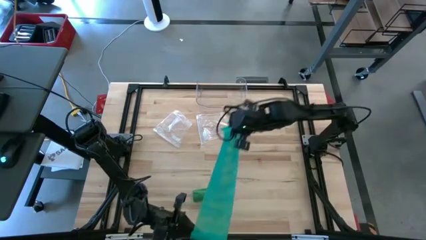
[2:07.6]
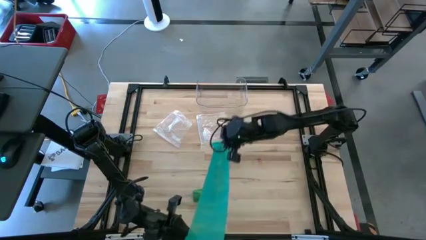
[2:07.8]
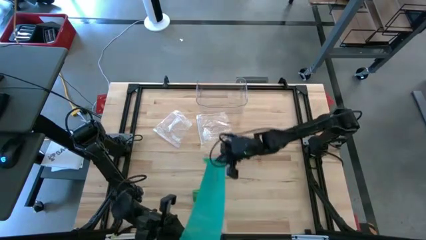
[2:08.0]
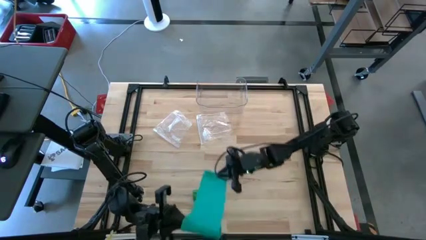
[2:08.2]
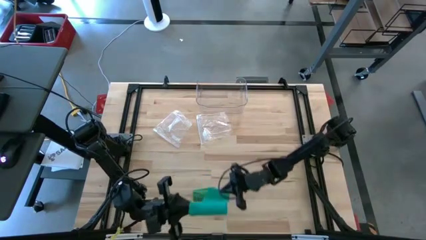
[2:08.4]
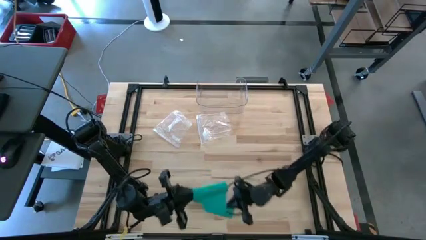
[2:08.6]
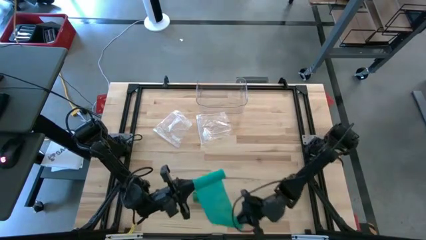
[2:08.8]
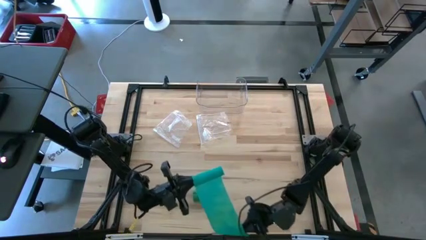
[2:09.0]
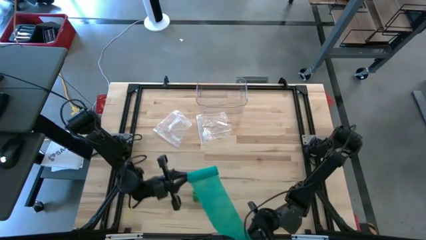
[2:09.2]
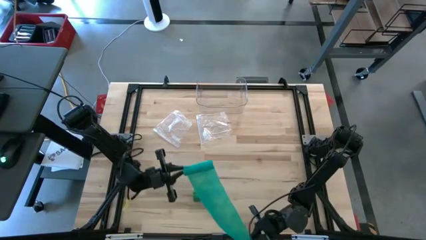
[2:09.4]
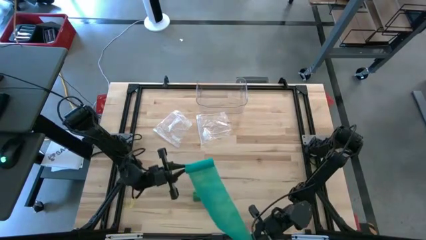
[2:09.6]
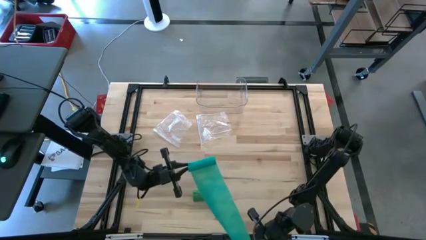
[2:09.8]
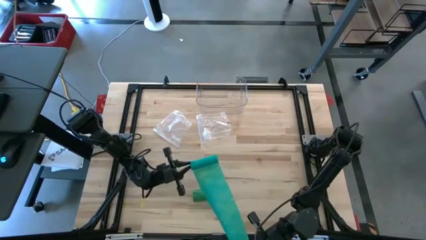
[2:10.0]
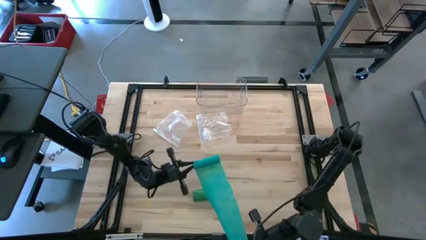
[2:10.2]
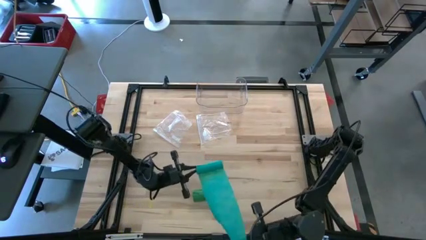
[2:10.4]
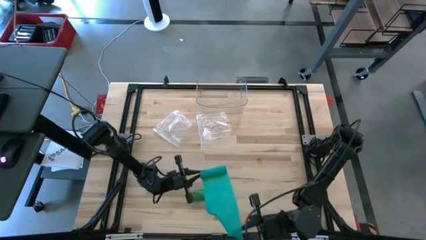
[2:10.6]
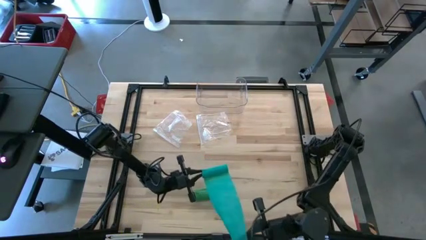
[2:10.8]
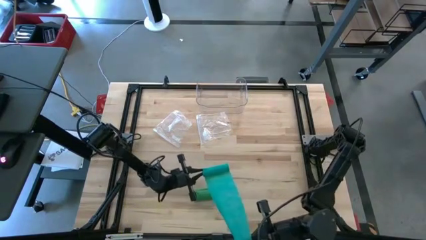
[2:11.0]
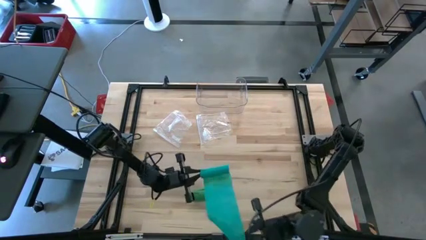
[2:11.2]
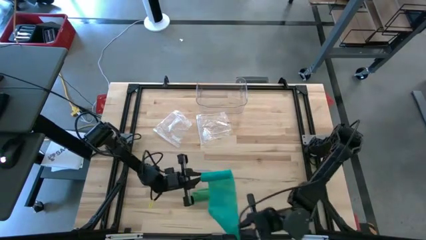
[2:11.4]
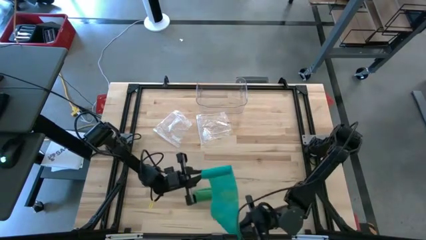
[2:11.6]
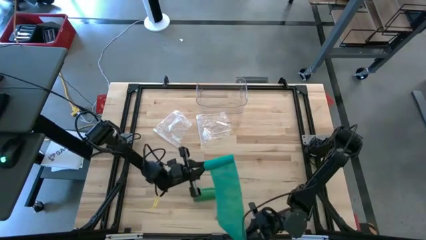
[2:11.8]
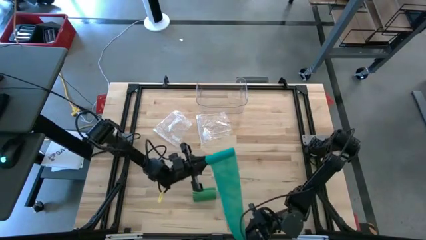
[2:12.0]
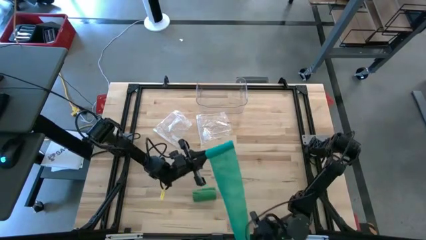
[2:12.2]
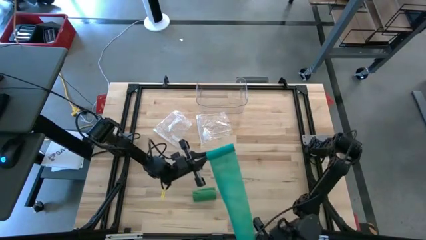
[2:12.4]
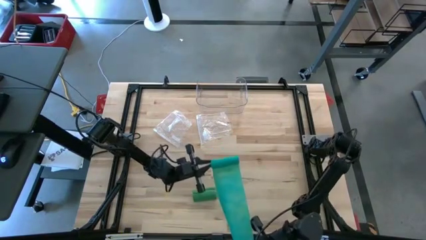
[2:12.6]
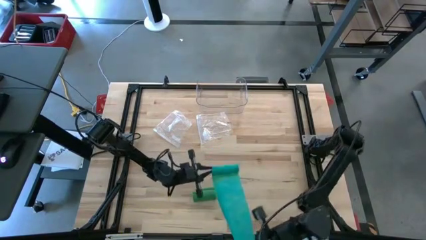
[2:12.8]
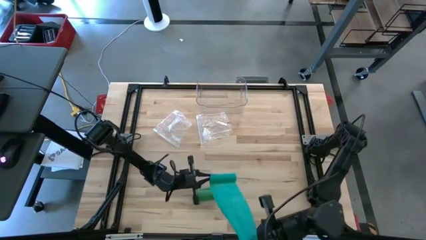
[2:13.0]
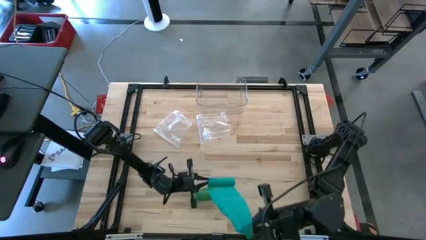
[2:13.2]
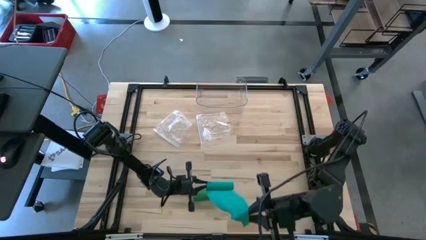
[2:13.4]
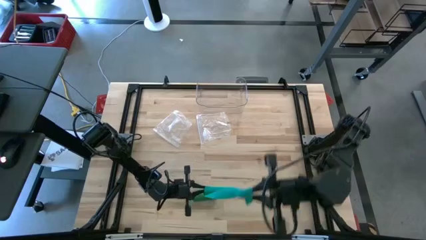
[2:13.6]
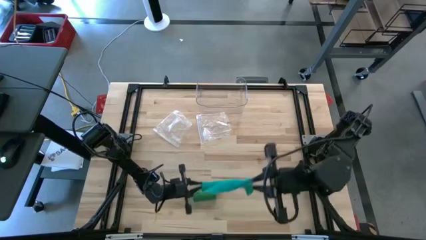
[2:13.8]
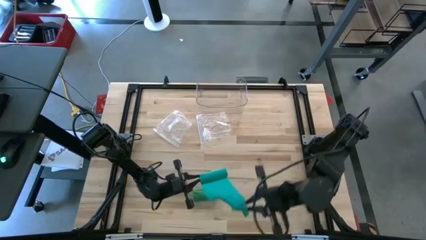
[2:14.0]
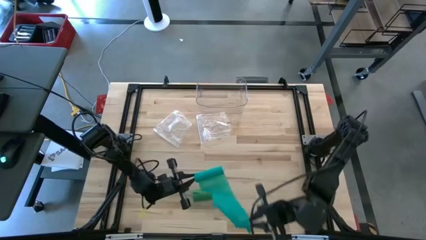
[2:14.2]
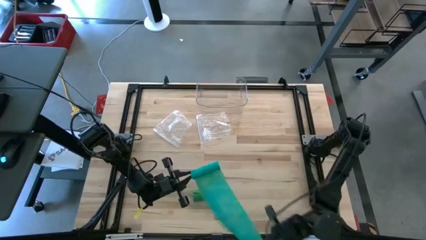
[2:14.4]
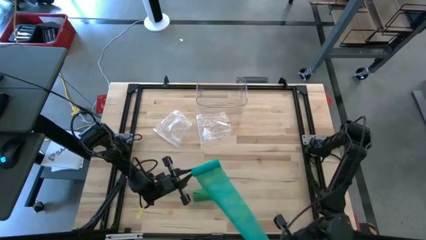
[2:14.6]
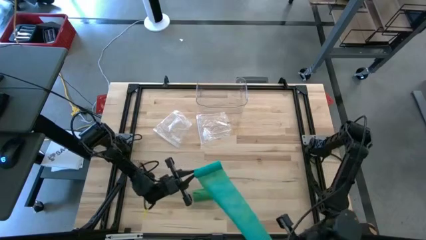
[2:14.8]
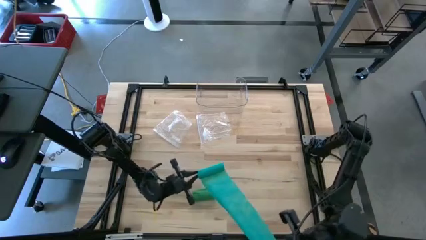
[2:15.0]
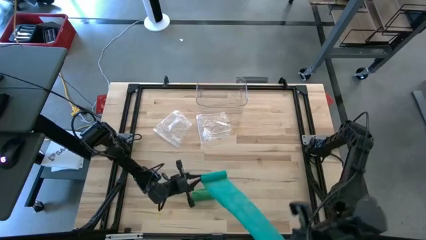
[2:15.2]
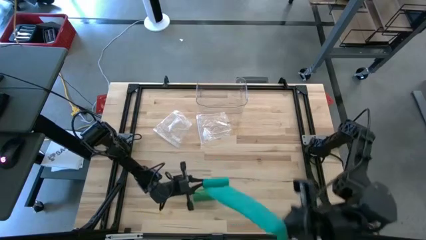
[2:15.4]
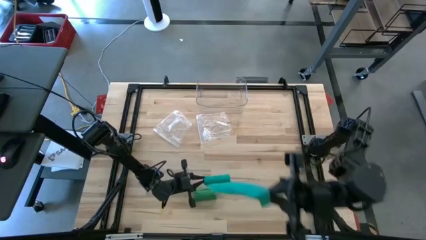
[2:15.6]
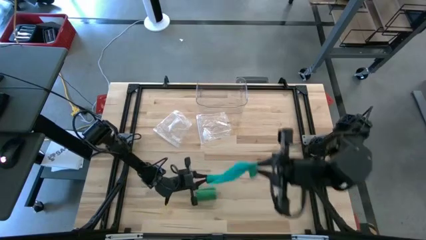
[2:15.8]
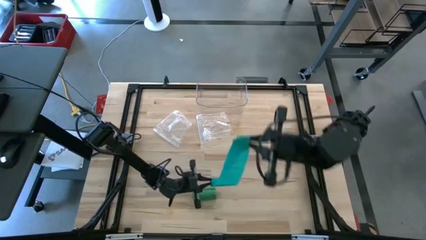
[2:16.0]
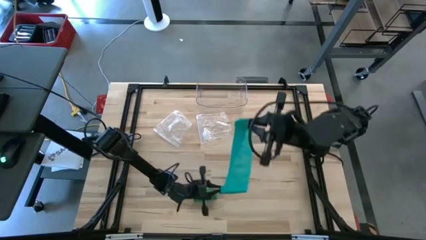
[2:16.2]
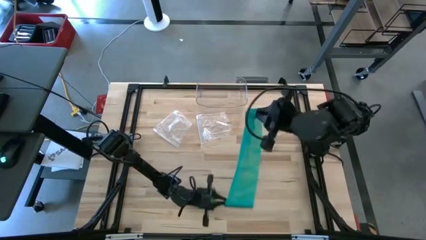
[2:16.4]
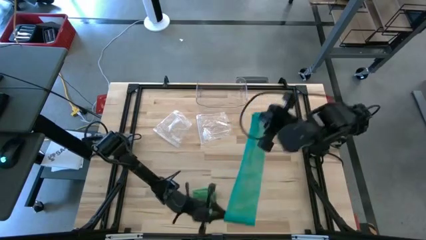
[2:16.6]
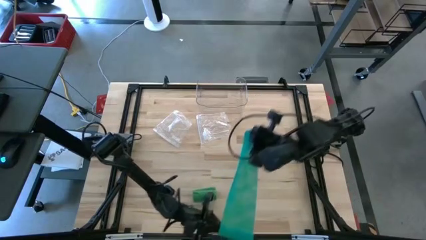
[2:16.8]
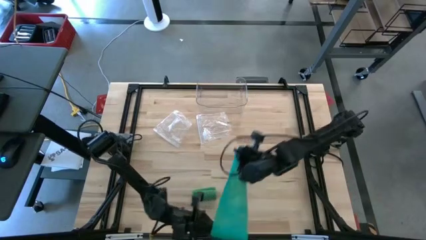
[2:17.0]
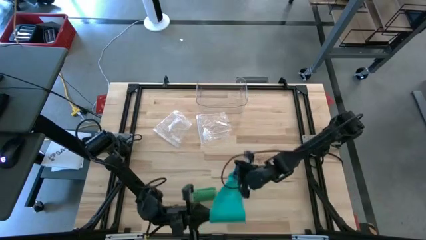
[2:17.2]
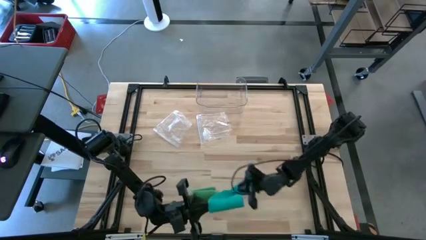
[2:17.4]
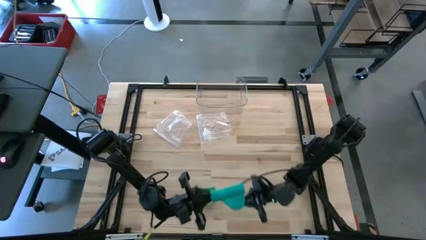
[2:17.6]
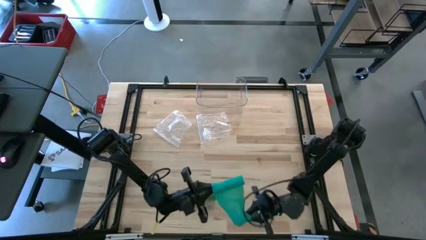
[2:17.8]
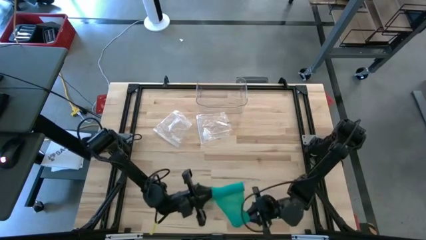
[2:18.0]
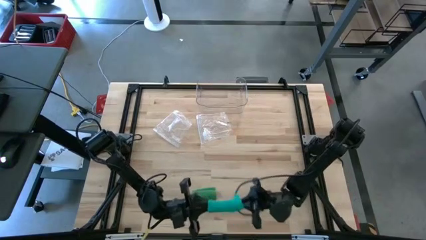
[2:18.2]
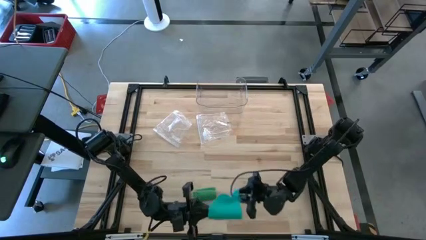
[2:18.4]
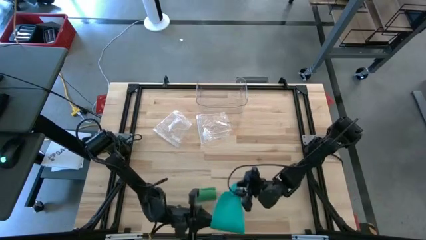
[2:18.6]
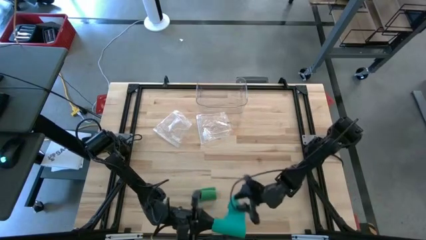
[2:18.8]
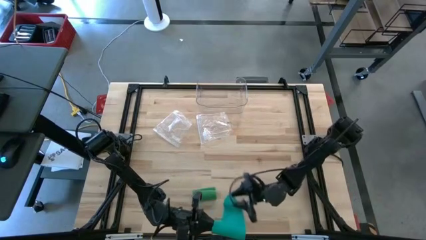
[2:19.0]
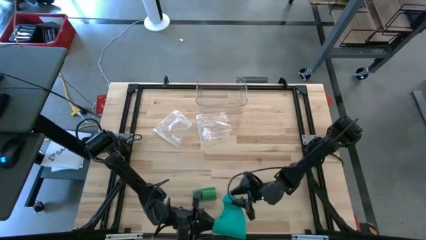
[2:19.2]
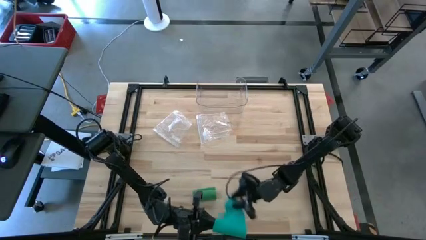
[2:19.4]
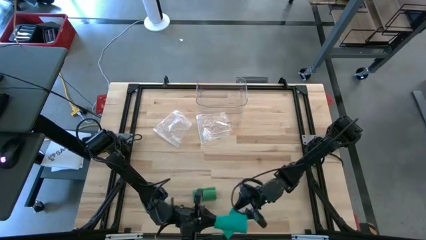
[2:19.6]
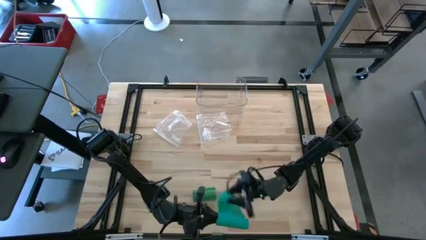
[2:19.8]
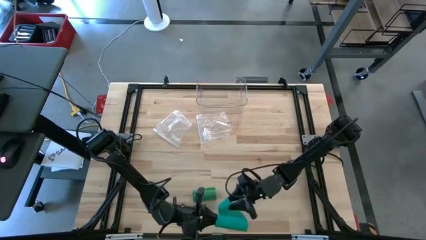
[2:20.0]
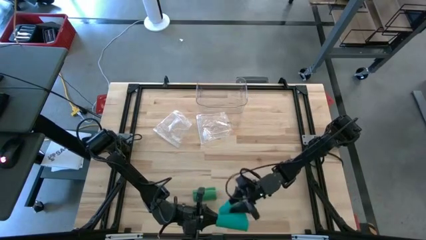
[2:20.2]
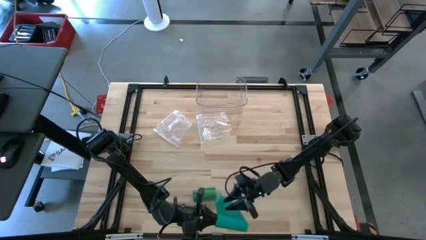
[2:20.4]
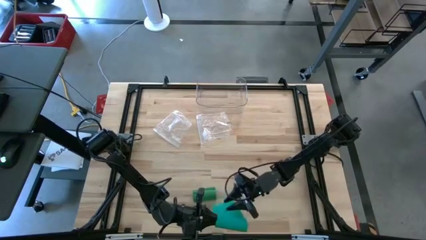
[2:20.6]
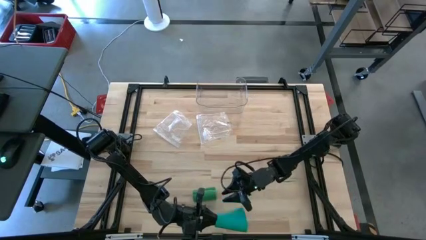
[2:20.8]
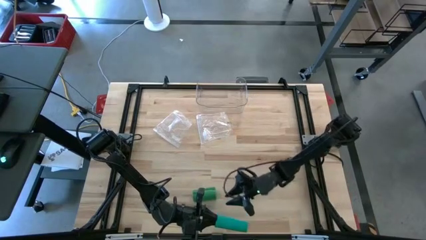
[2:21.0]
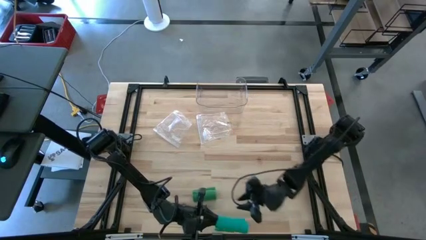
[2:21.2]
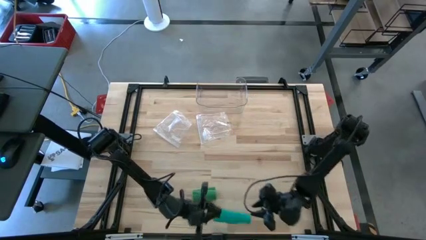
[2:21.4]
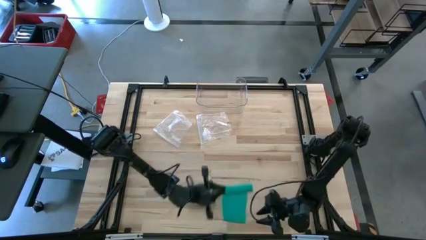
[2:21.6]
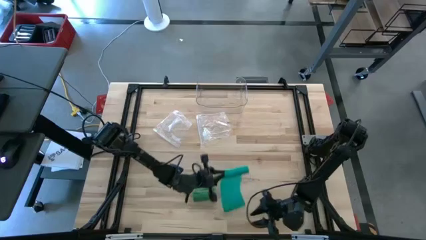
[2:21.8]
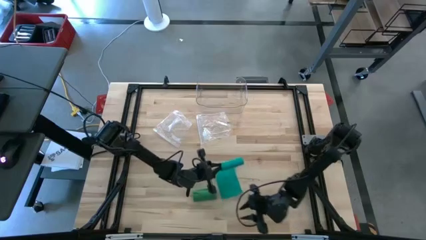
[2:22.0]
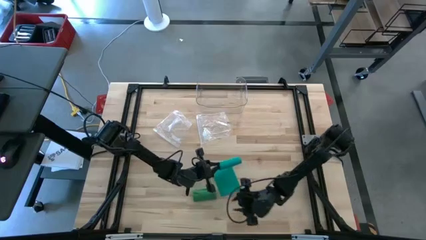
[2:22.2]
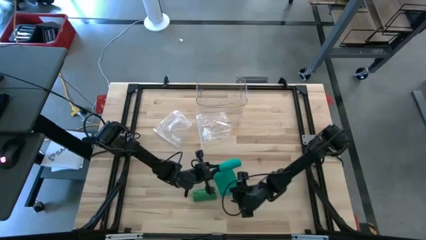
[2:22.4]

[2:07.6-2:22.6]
Task: Roll bandage
Roll the blue bandage
